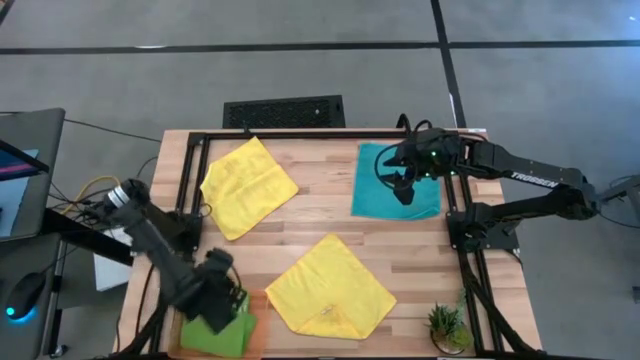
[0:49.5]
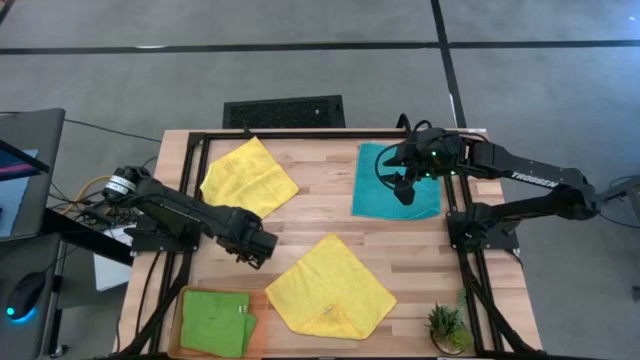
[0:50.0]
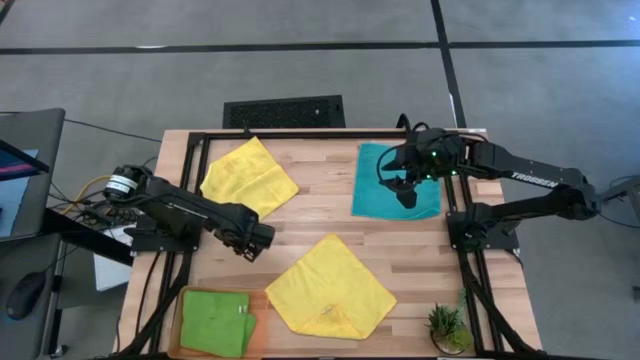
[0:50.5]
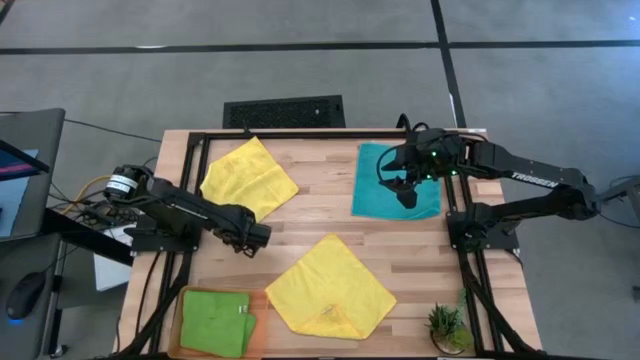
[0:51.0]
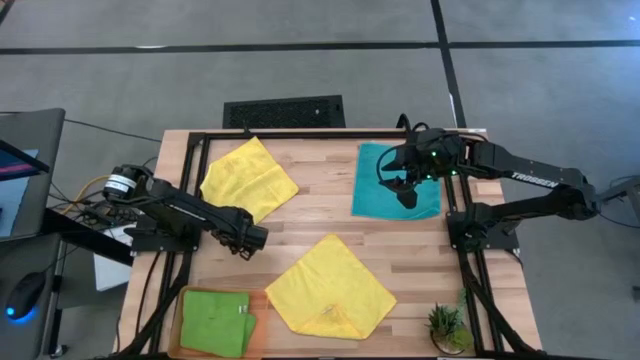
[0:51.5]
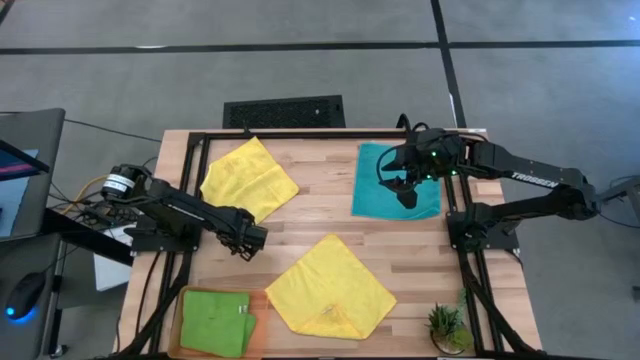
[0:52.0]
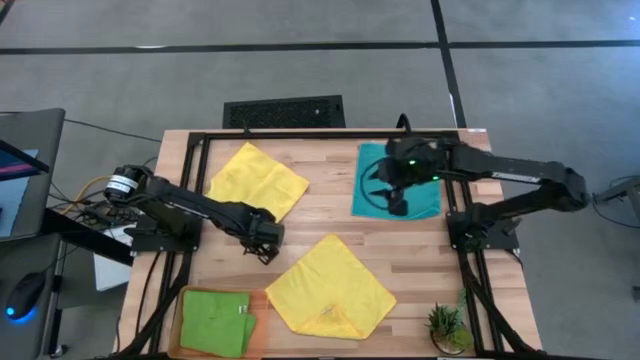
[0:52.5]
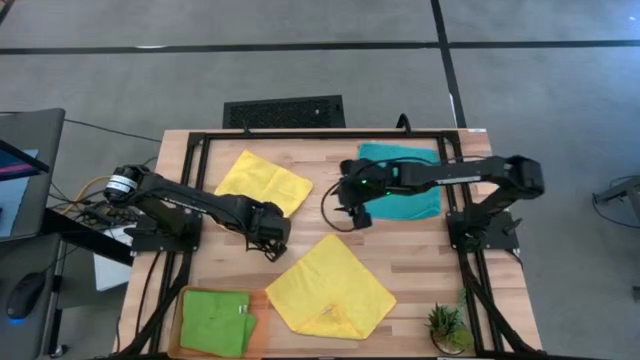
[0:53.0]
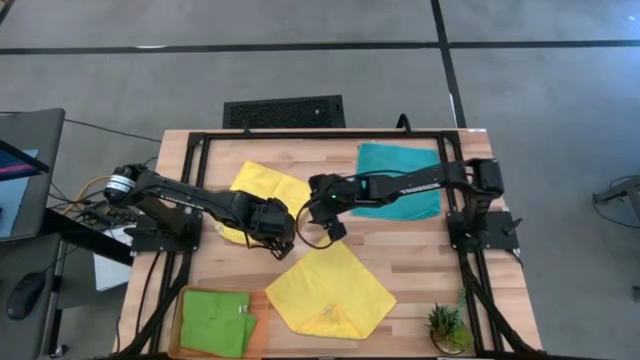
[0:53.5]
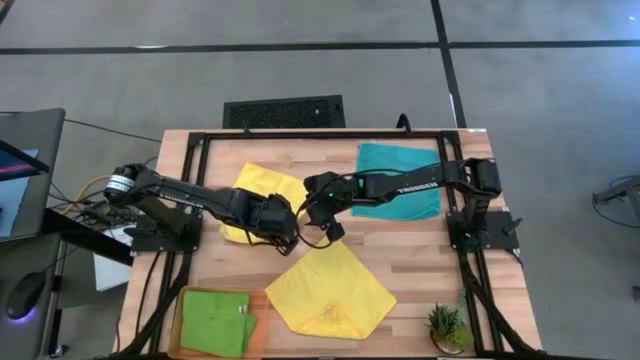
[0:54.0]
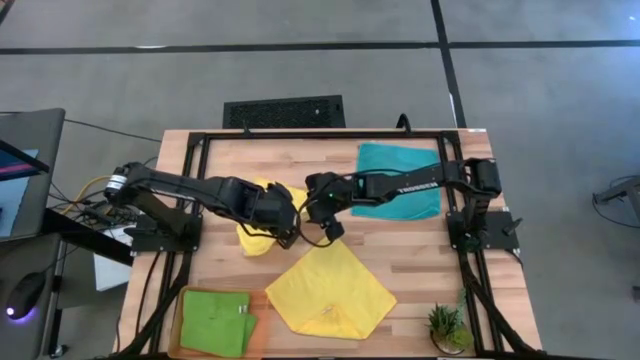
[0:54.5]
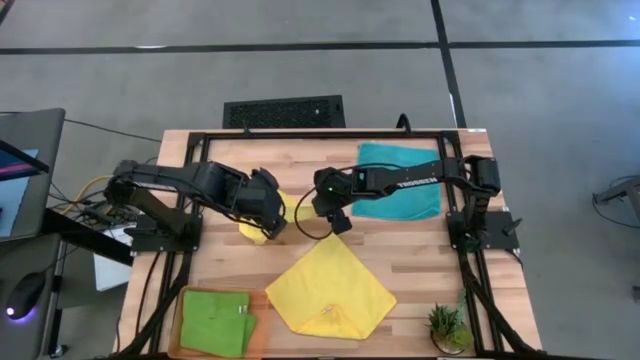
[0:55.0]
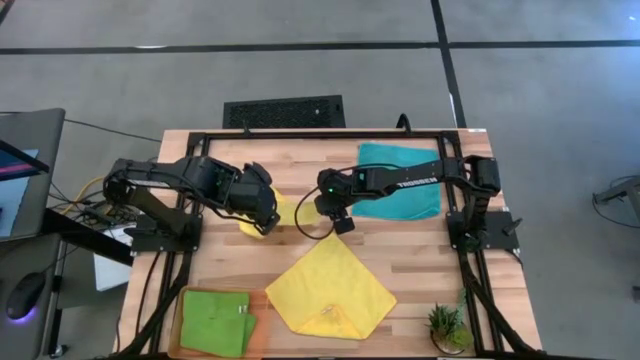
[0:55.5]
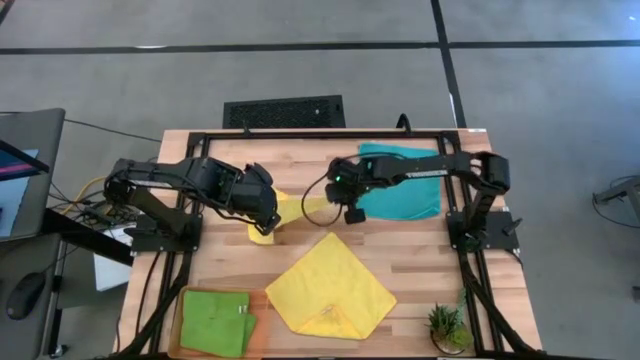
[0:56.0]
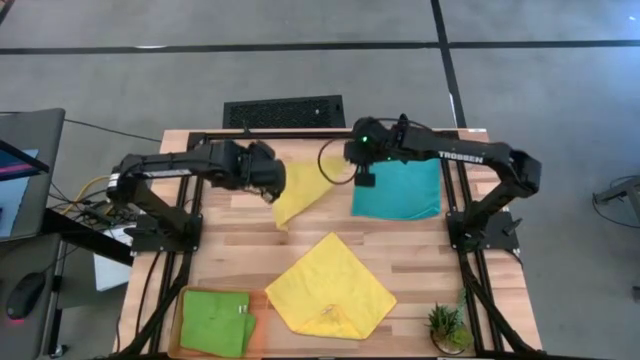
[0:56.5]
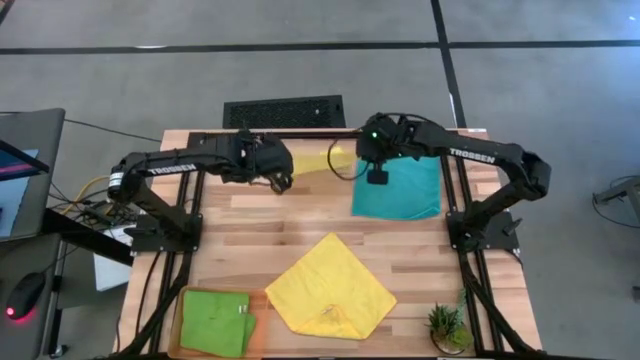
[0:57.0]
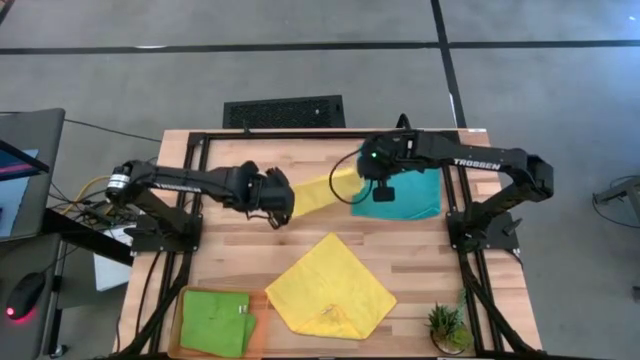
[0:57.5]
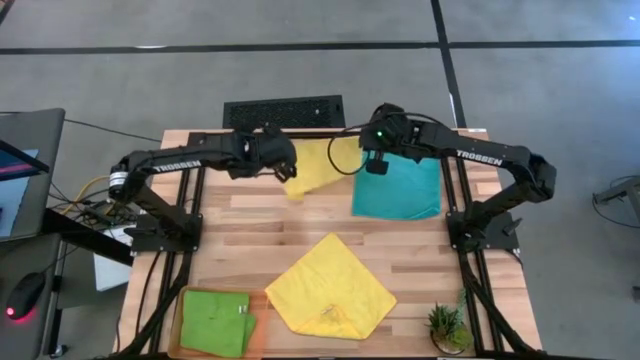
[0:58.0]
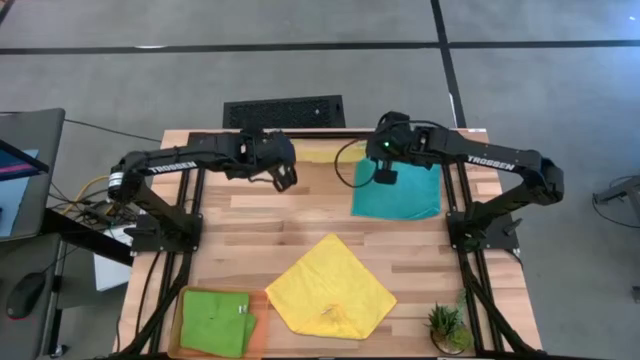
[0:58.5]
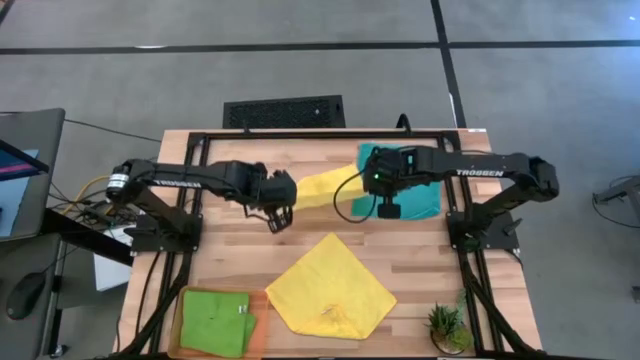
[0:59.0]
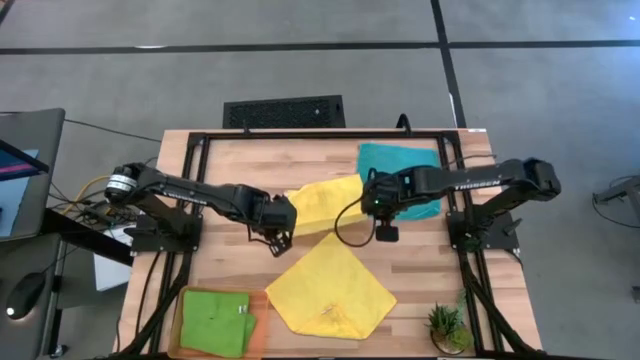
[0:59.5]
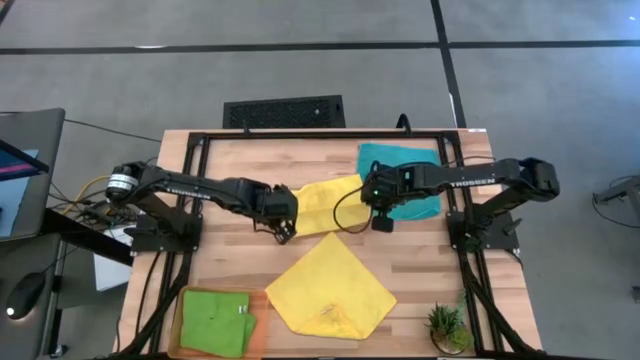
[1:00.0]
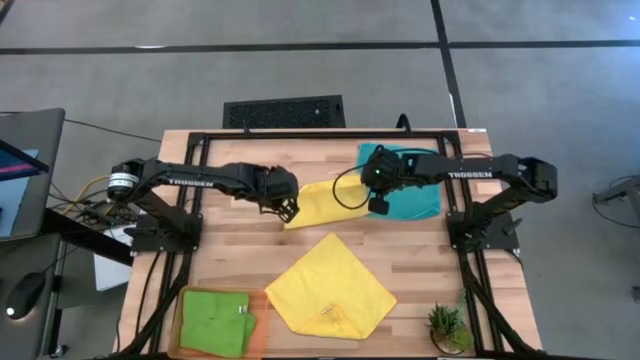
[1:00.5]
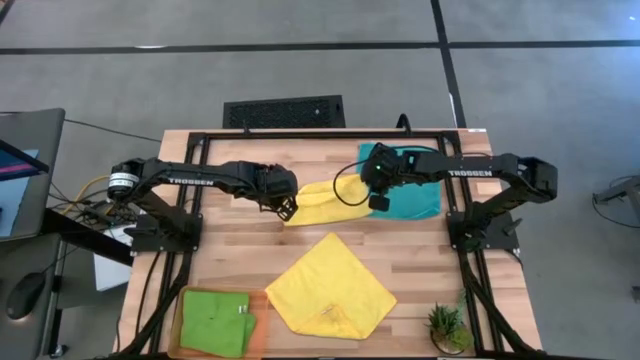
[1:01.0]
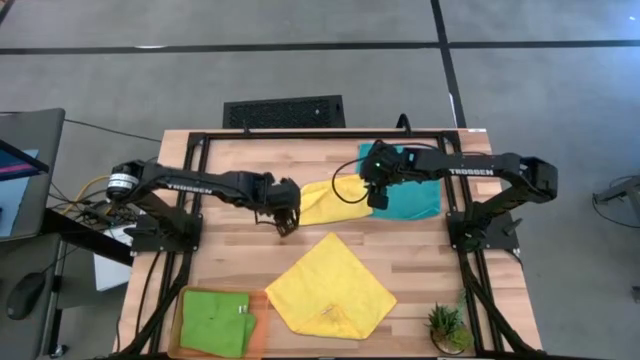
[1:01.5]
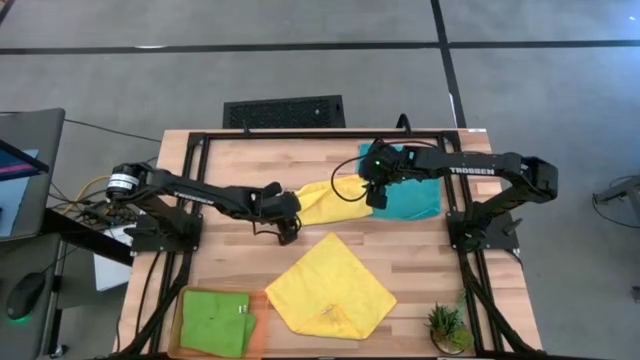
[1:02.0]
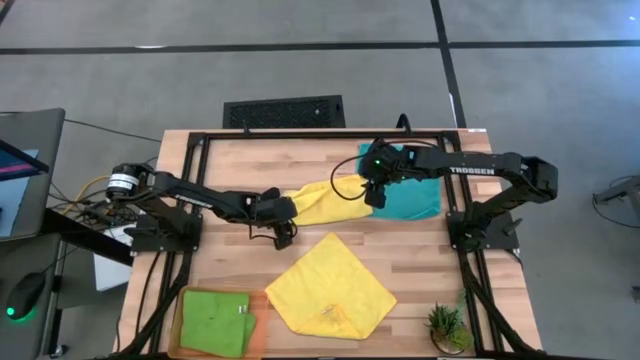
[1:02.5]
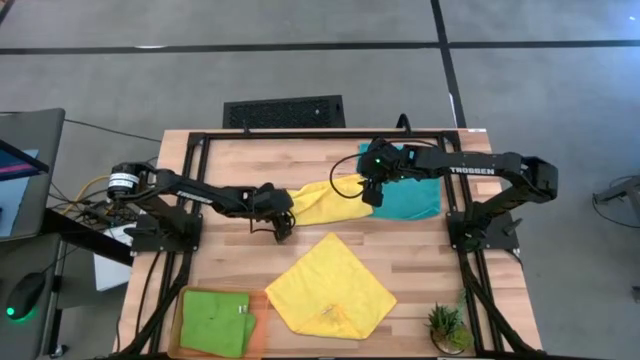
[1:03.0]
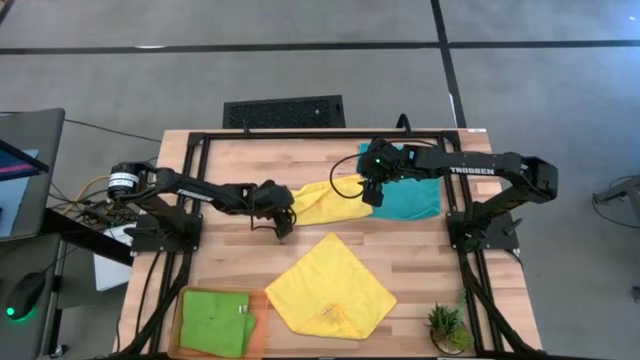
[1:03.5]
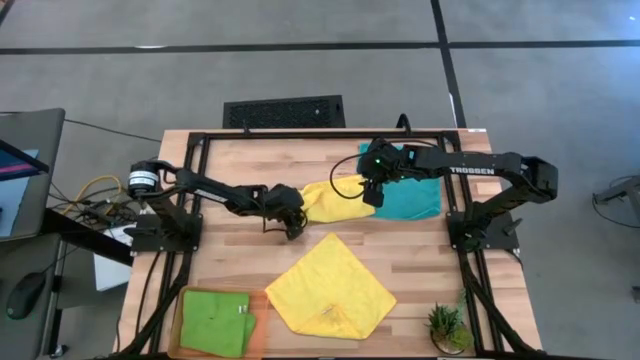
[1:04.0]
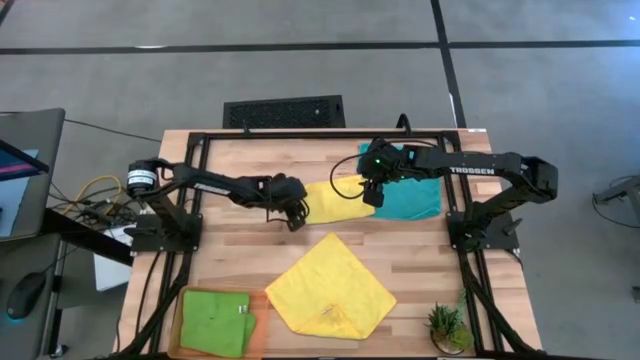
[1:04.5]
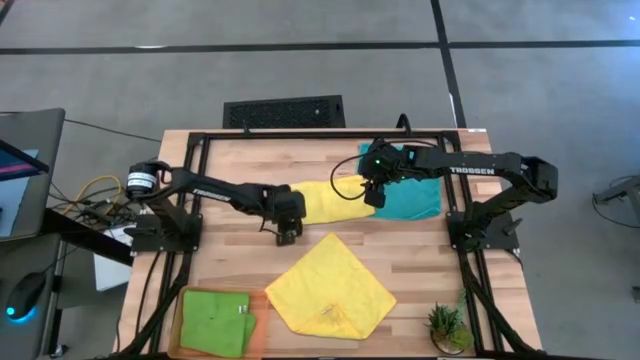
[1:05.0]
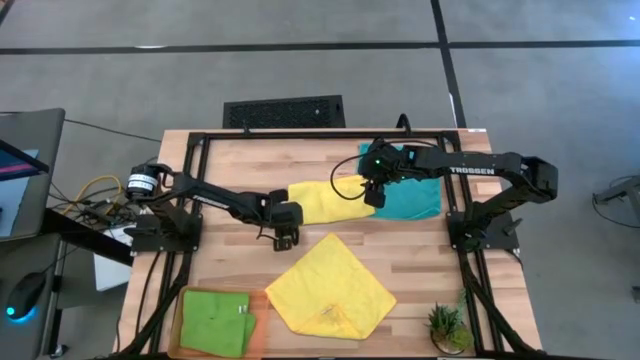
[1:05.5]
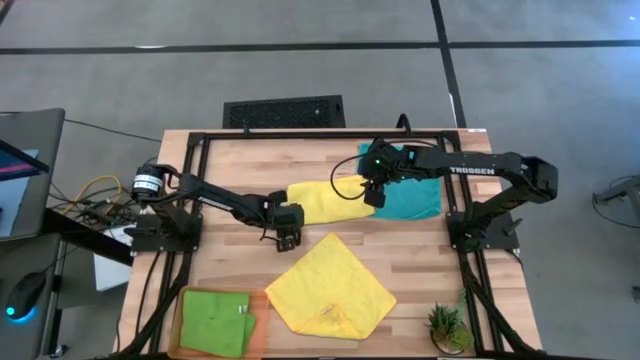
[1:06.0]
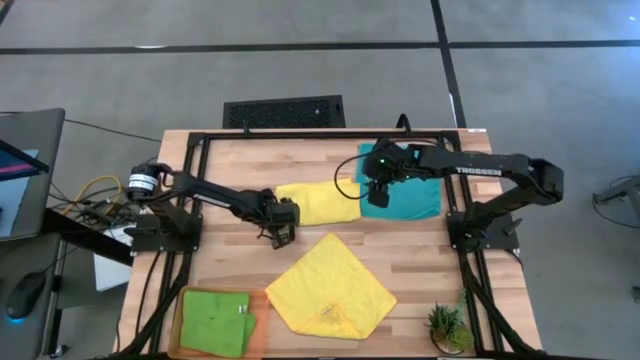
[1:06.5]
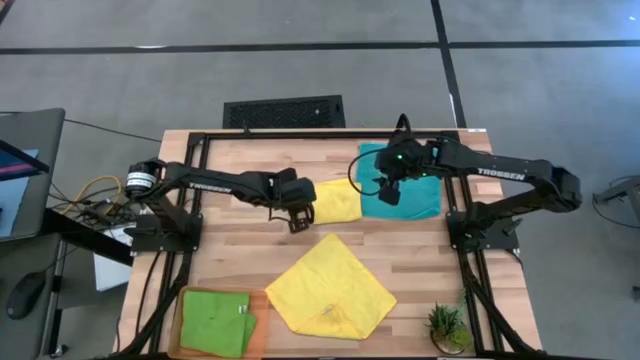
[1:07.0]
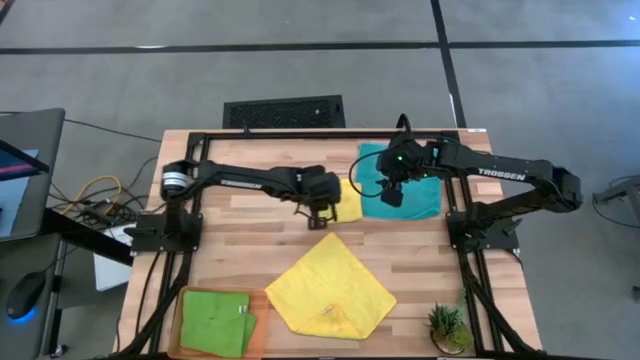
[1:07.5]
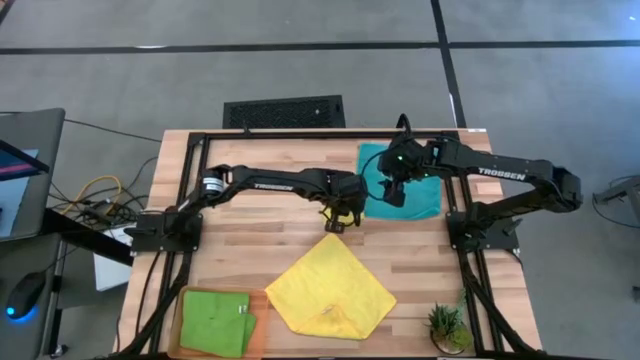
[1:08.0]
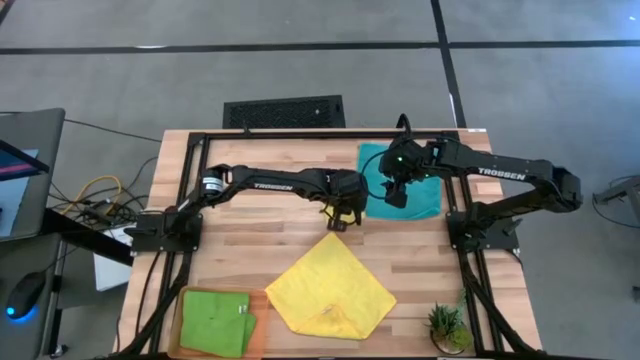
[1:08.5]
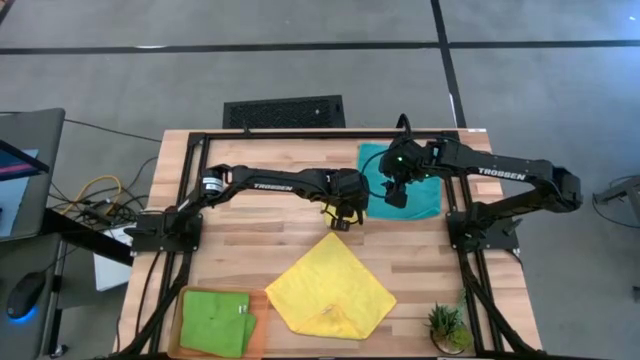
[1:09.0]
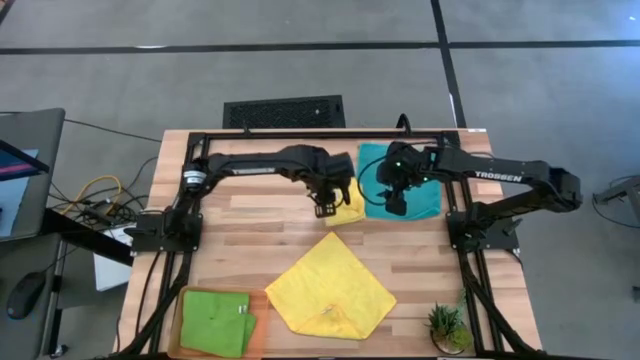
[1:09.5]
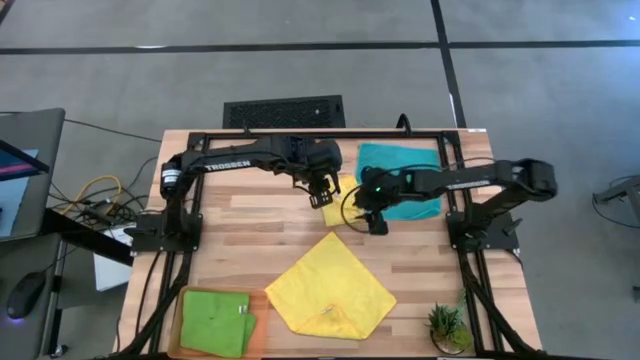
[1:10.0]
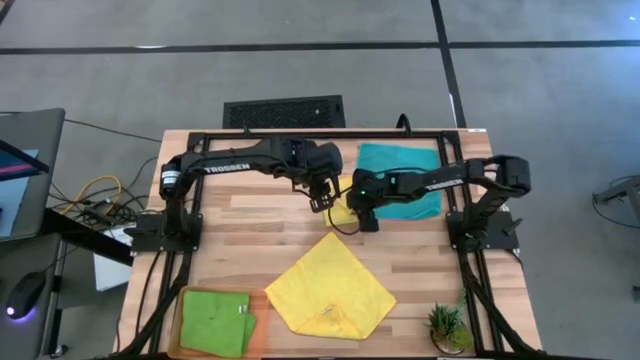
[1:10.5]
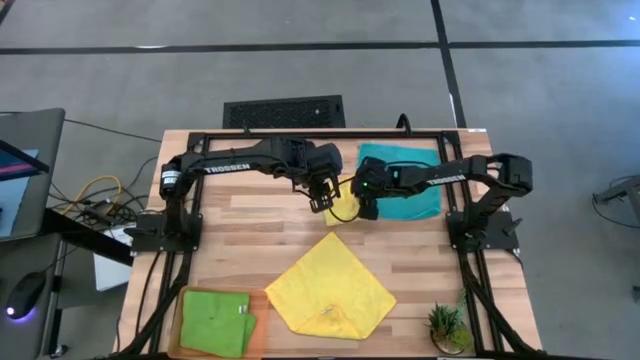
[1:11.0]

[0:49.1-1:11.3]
Task: Fold microfiber towels
Fold the top yellow microfiber towel
